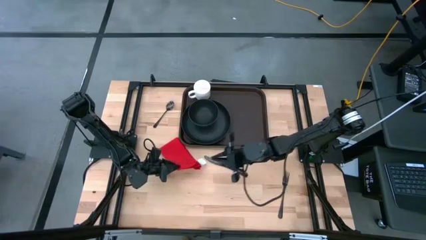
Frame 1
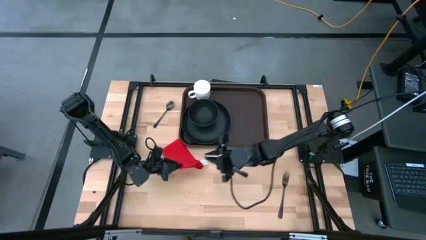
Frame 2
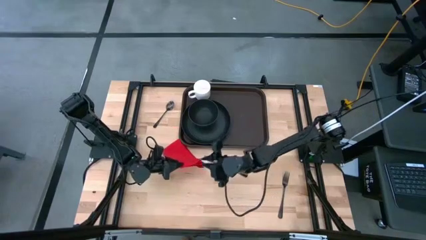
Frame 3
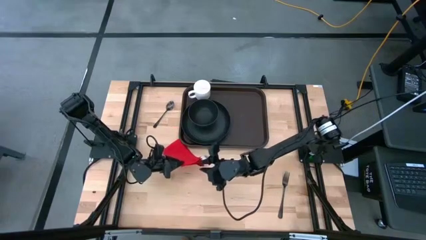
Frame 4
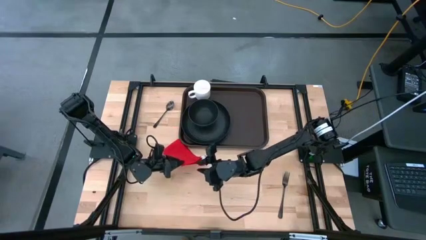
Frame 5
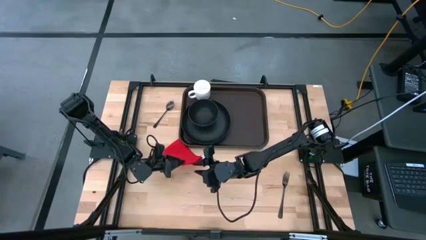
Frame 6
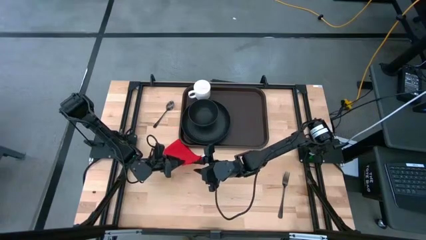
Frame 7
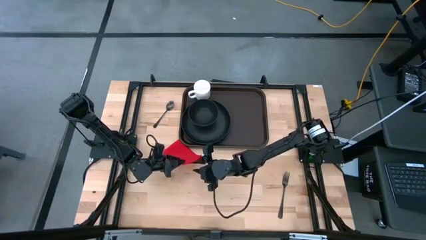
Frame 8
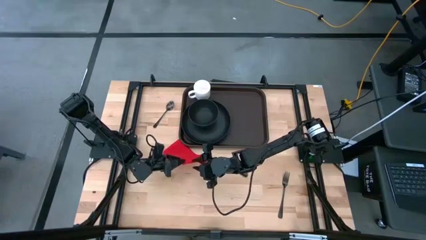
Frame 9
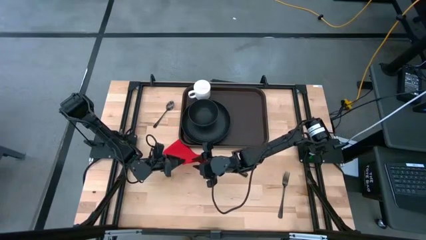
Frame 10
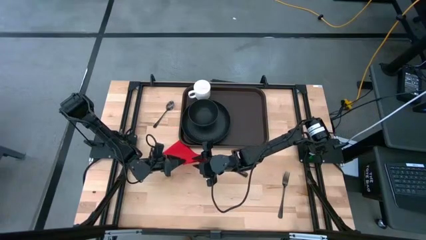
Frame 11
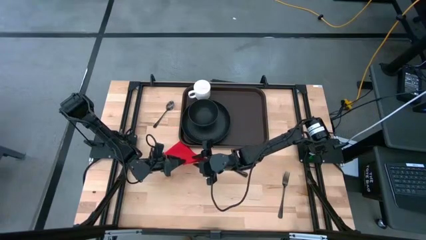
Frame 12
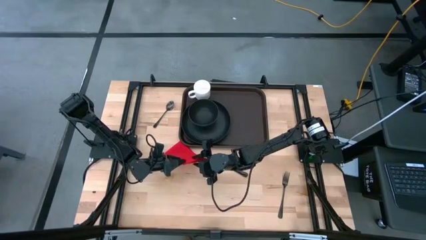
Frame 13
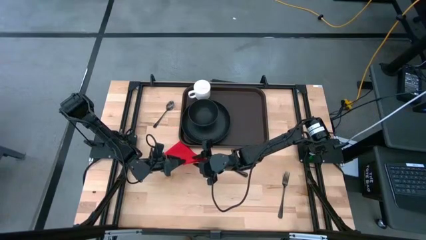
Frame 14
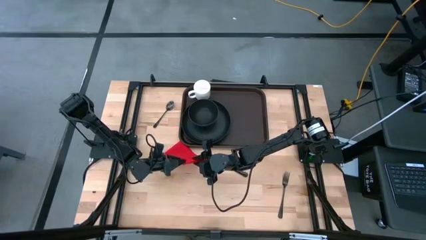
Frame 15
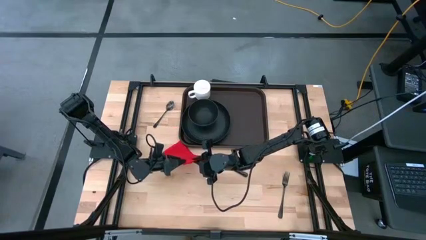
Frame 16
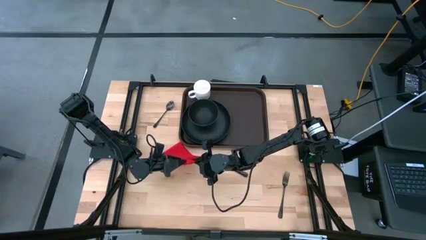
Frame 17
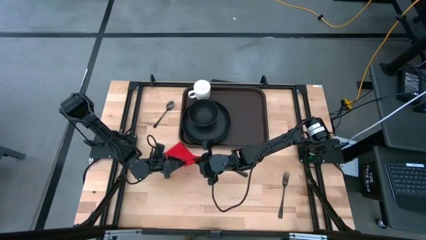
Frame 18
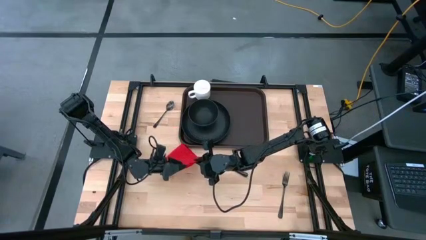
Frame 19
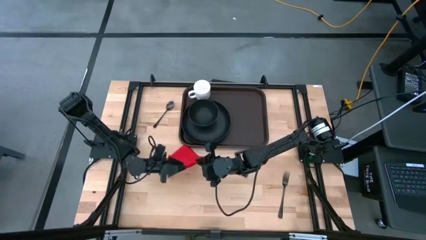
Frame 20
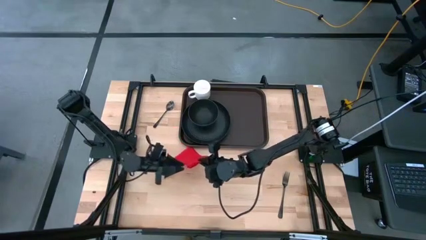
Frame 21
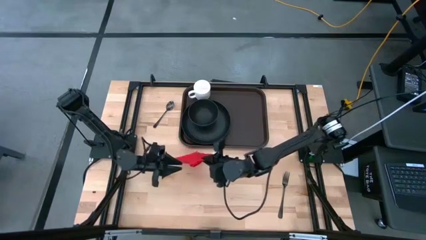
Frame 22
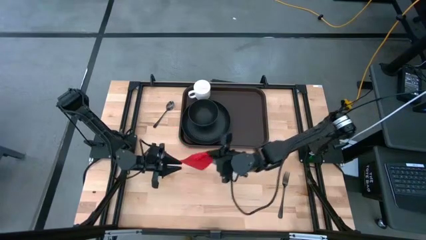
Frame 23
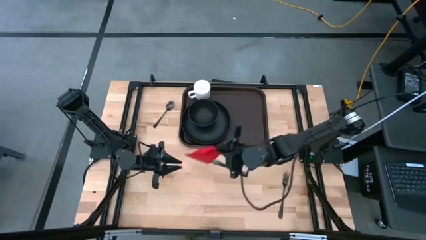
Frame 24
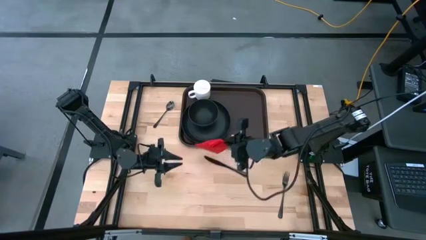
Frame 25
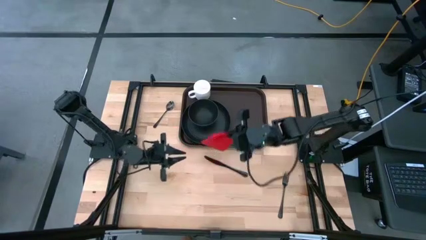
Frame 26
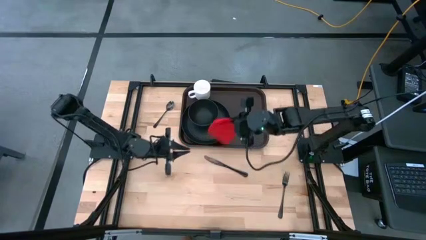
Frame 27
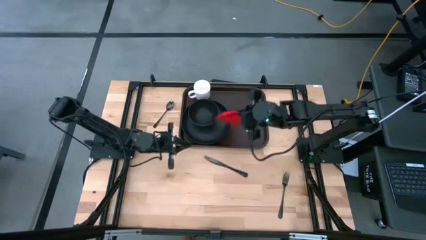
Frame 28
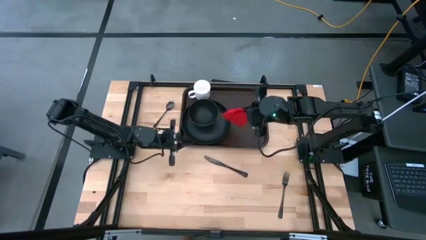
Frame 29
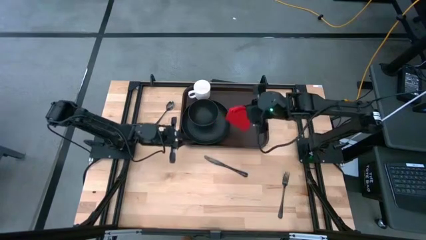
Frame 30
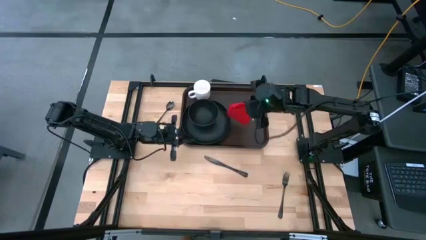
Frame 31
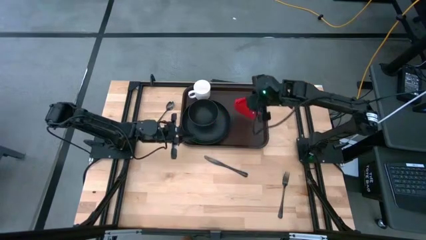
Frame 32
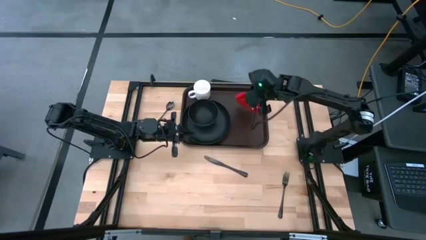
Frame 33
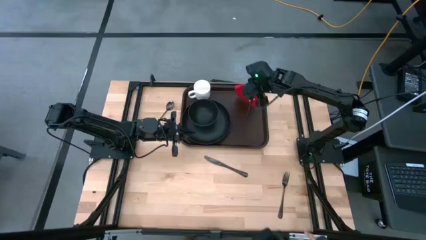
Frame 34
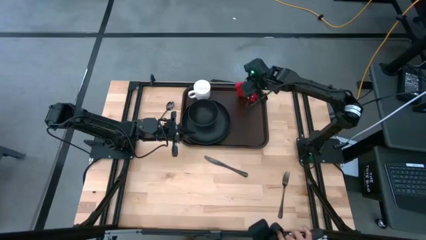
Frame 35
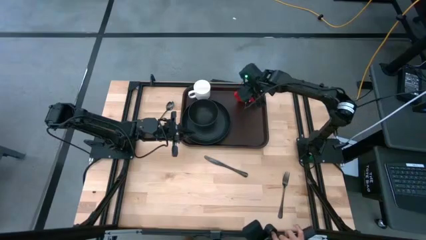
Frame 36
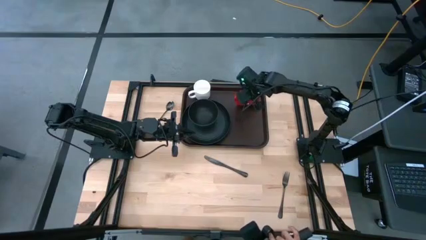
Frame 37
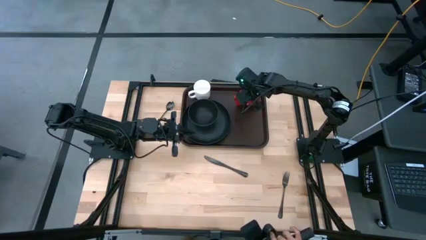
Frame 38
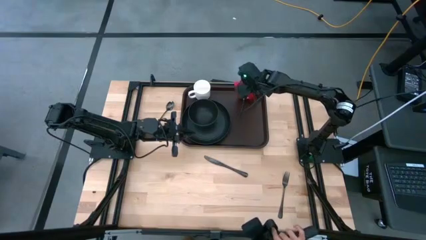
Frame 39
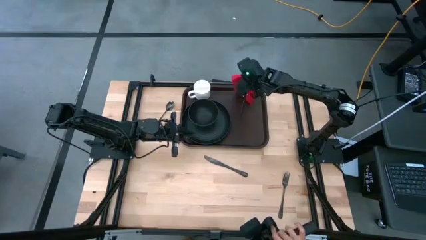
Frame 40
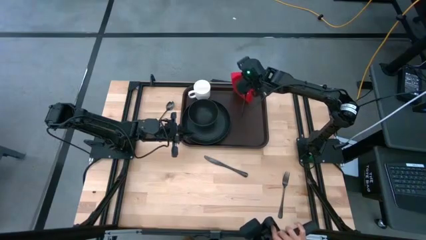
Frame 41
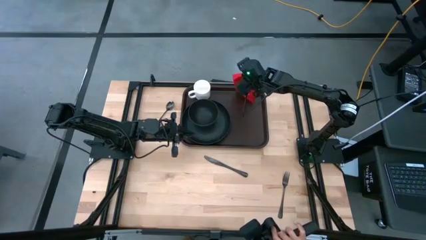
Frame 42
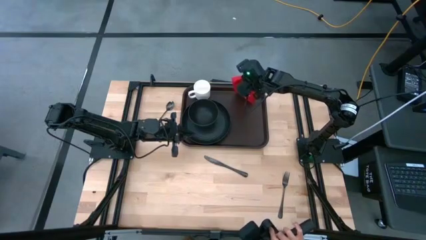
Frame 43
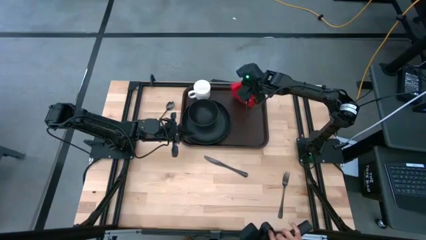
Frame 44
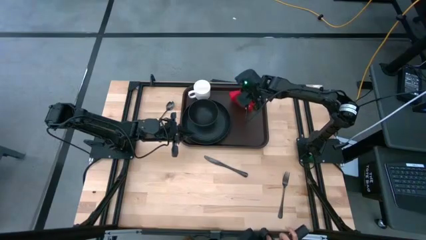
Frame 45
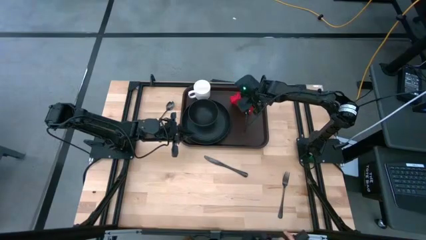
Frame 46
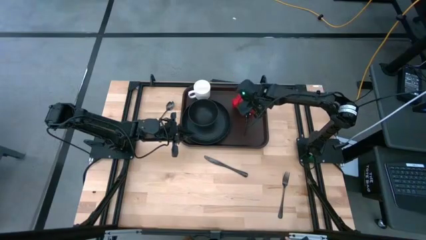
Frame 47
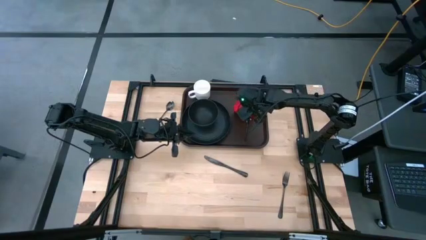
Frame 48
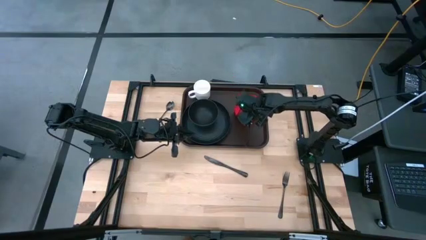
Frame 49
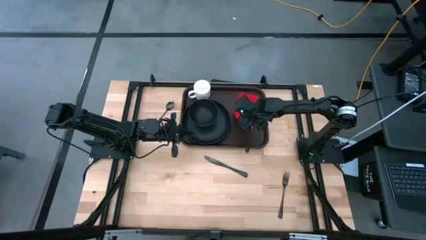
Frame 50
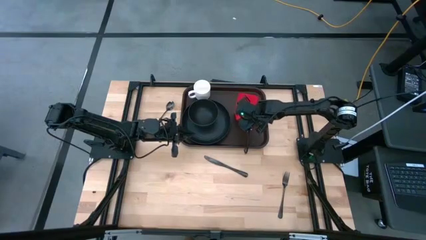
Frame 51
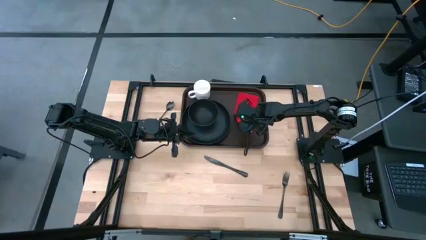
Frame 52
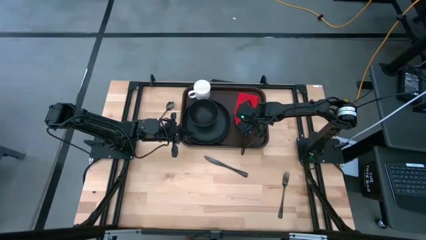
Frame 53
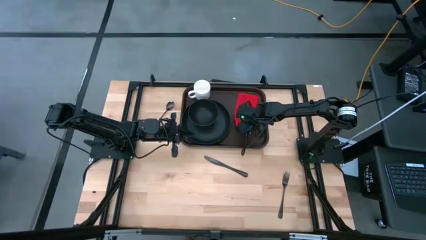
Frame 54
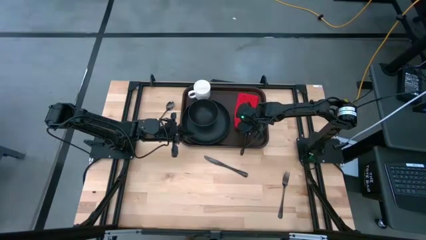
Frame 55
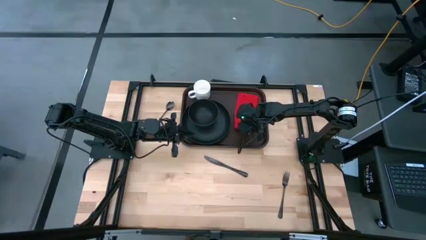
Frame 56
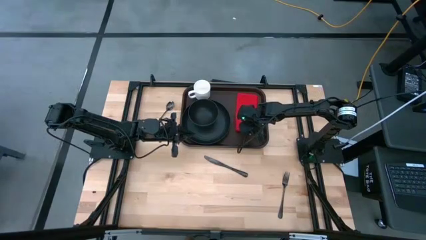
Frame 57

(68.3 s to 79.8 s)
Task: Set up tray
Put the red napkin on the brown serving tray
